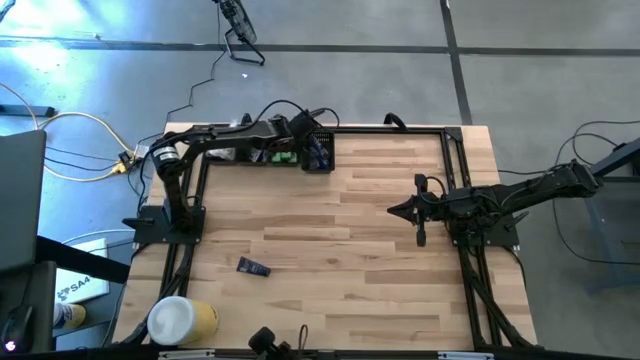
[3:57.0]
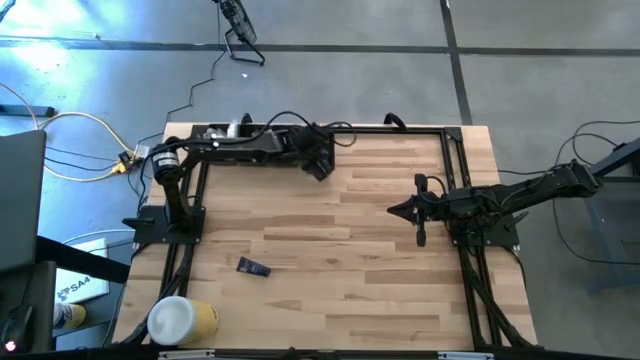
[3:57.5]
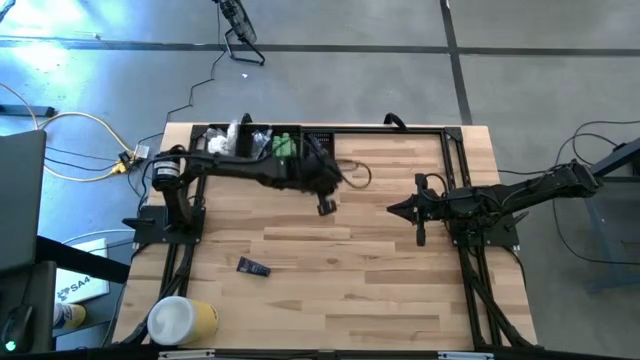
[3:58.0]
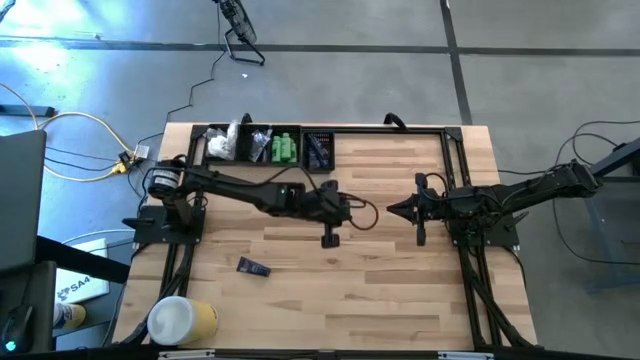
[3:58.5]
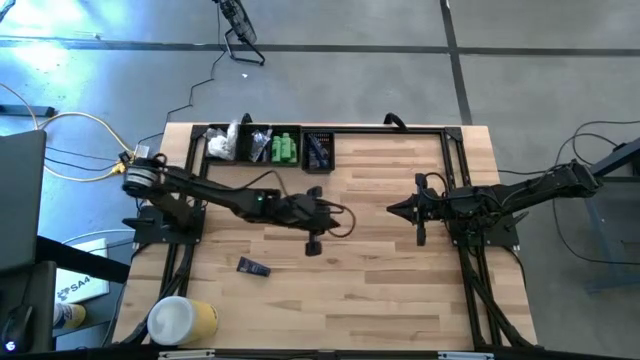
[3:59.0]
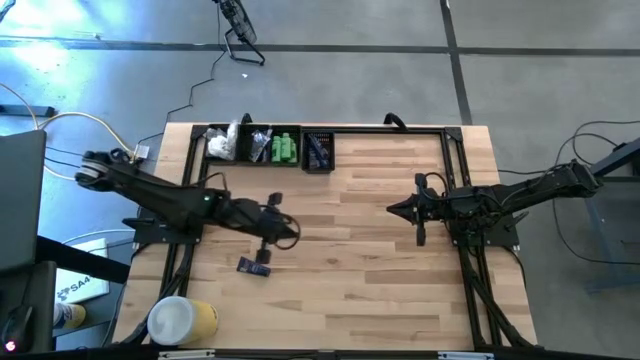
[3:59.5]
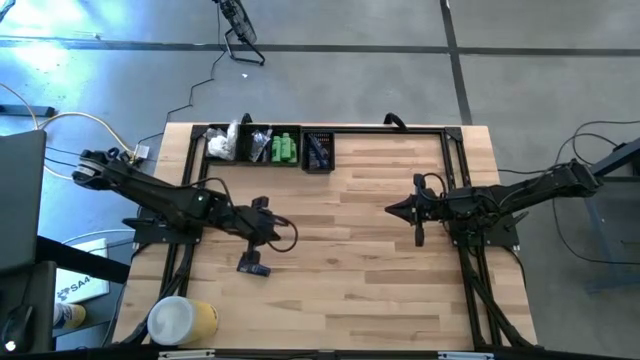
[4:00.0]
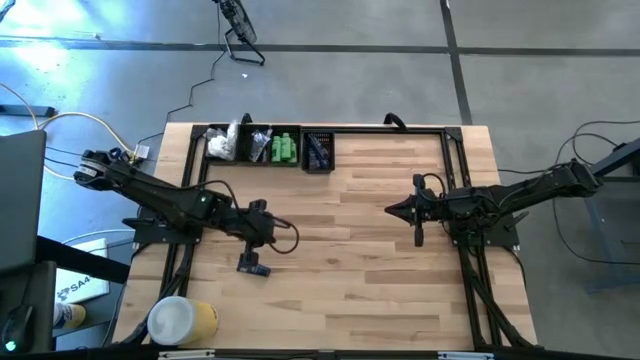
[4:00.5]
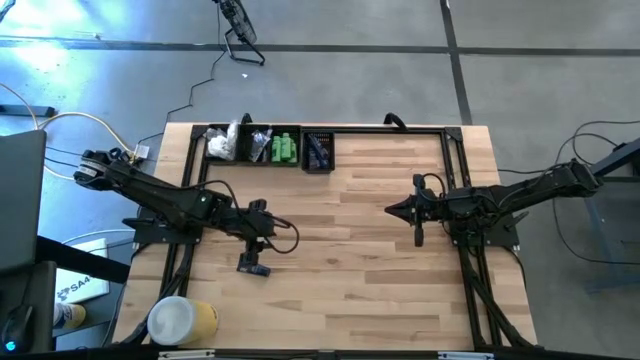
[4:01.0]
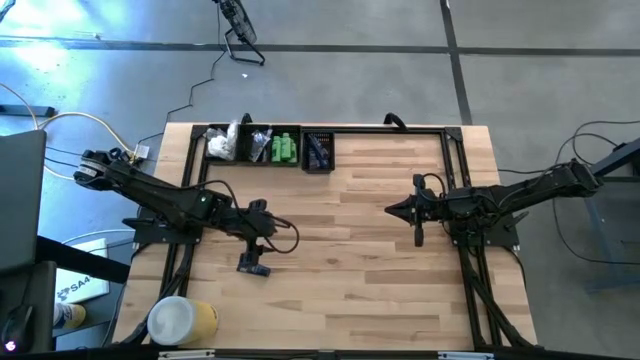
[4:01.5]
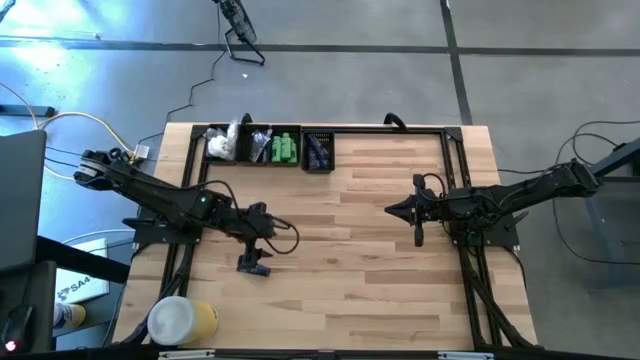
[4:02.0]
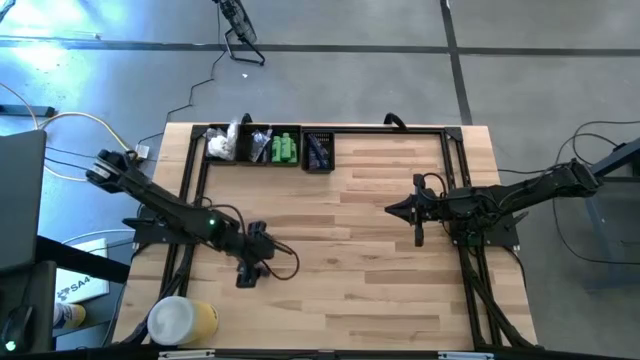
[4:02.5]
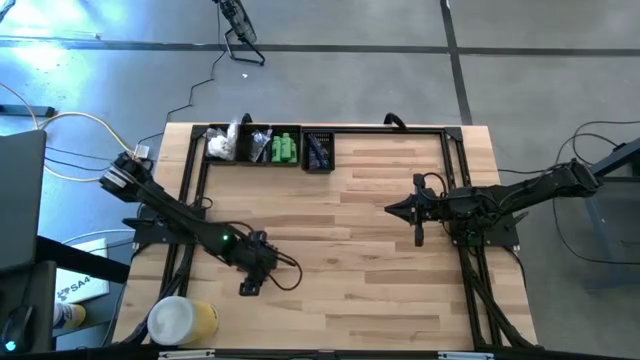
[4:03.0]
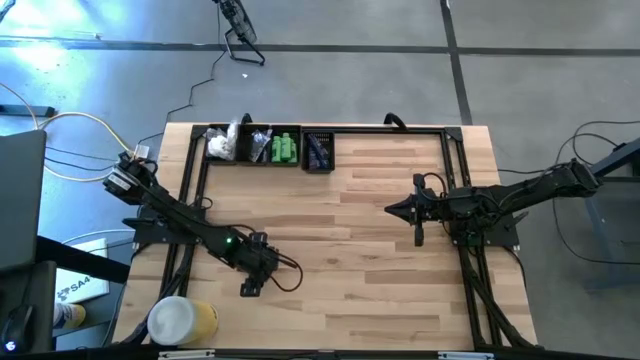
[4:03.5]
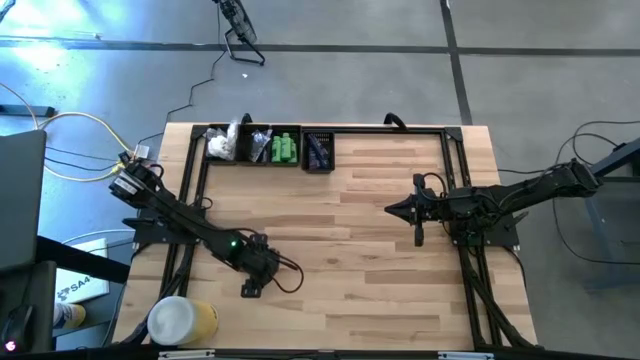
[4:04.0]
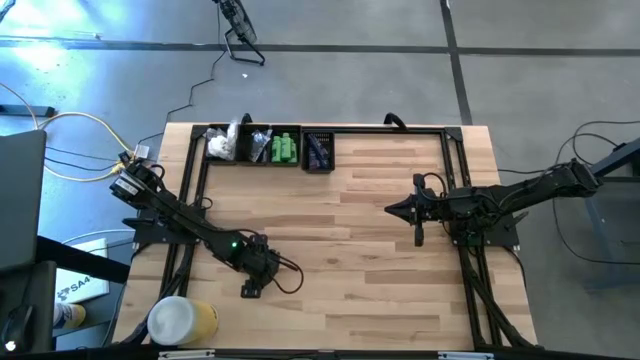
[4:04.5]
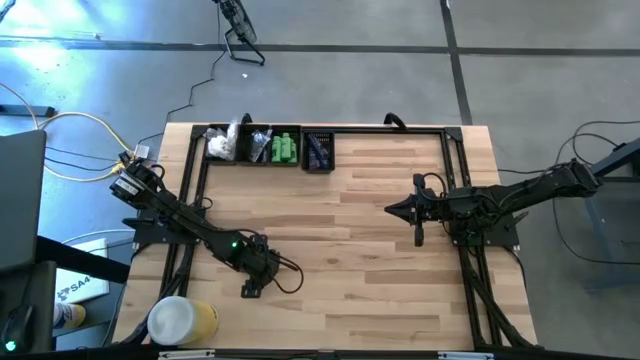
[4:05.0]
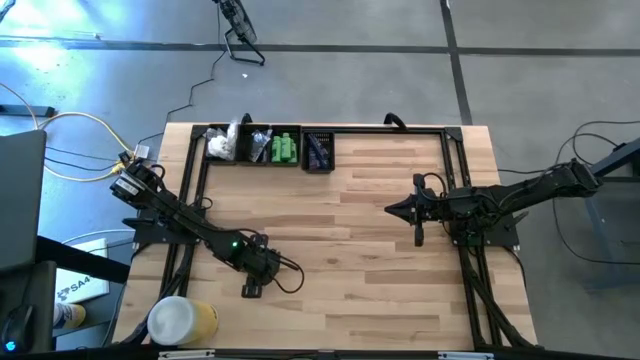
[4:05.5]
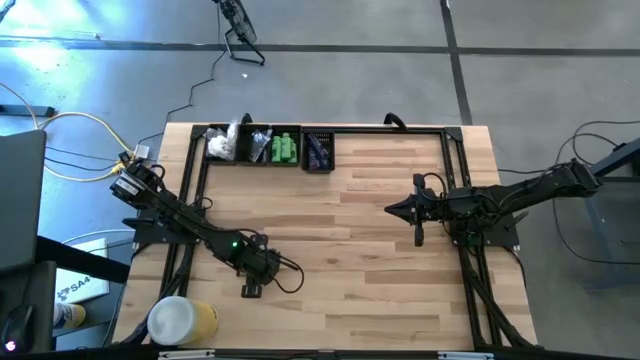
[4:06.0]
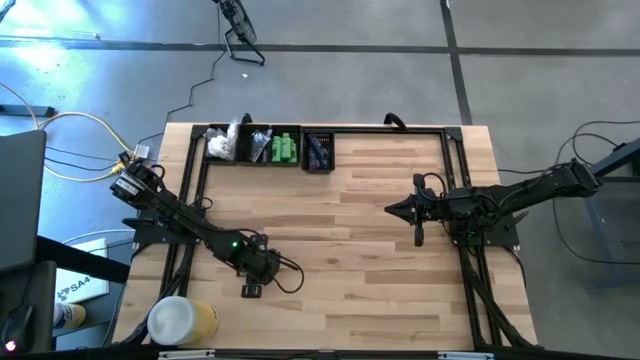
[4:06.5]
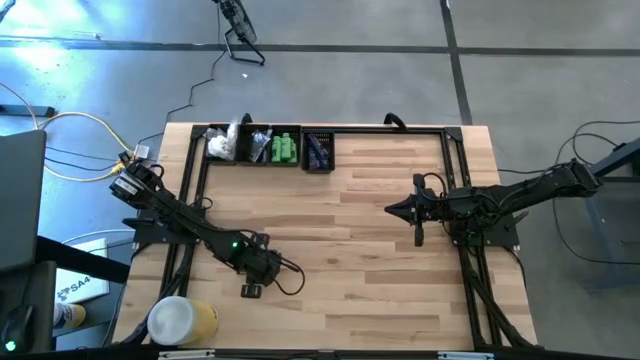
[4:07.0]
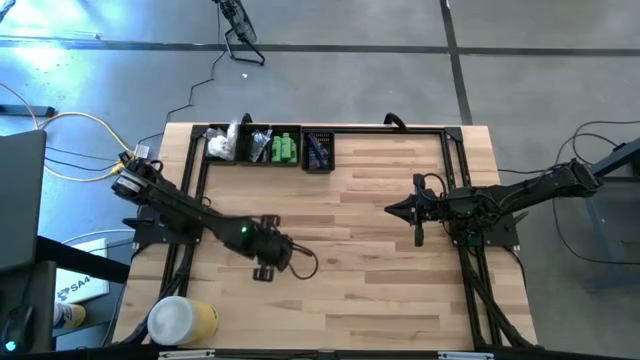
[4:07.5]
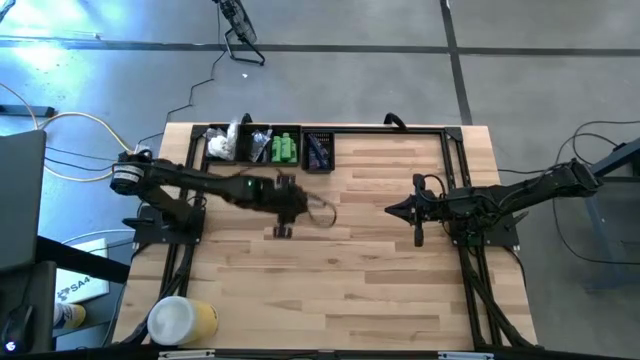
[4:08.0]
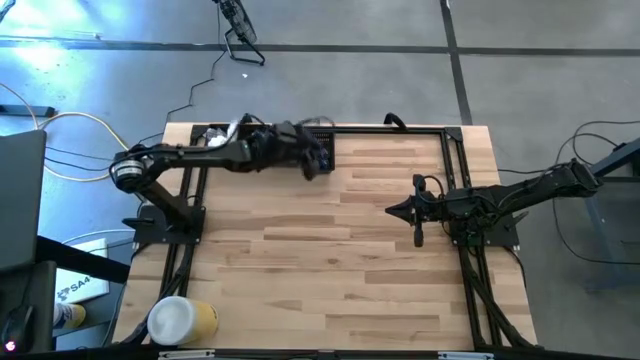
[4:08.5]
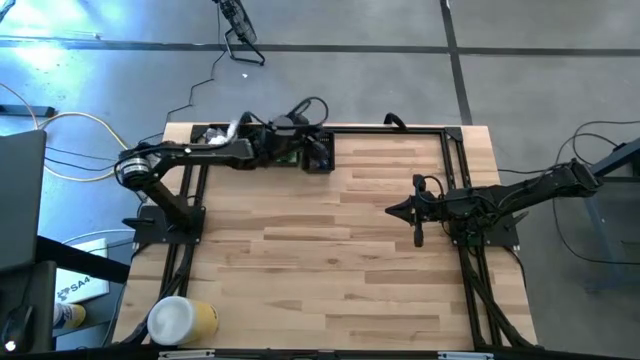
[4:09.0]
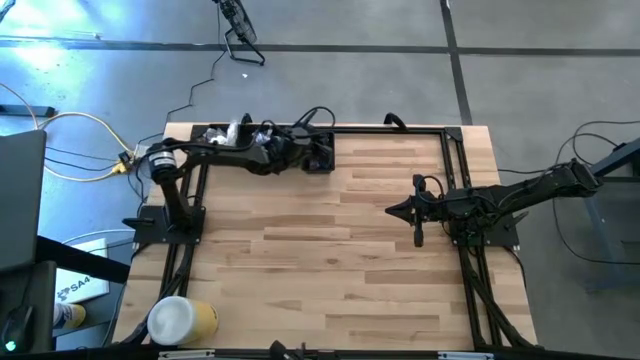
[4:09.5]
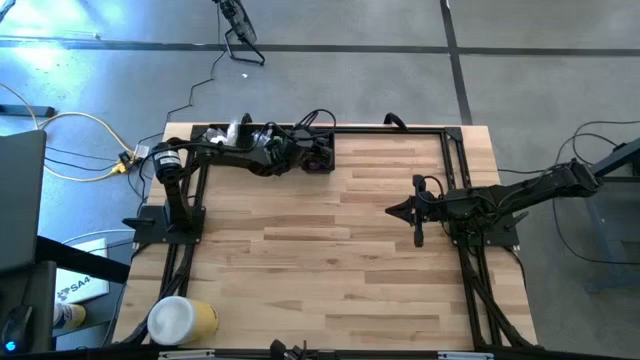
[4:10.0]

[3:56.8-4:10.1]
Task: Pick & Place Travel size toiletries
Put the shave cream into the right black bin

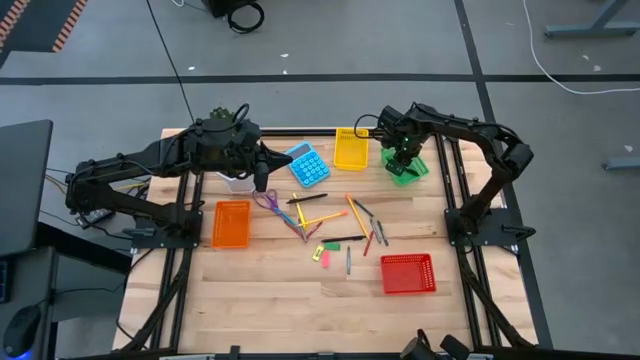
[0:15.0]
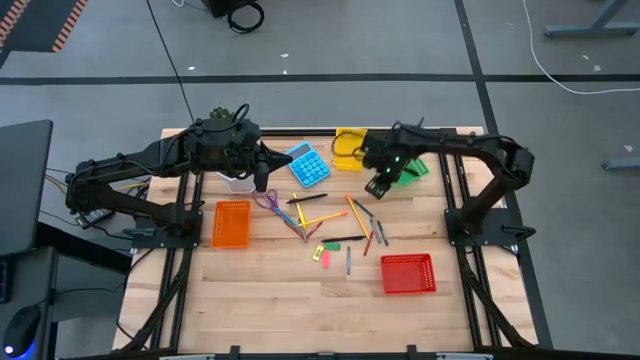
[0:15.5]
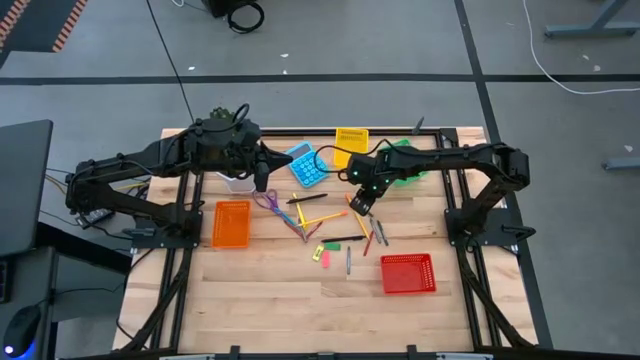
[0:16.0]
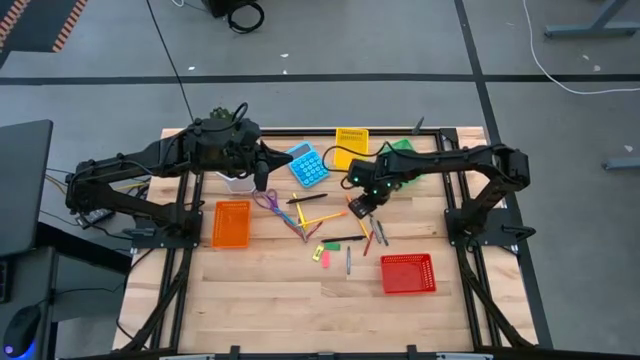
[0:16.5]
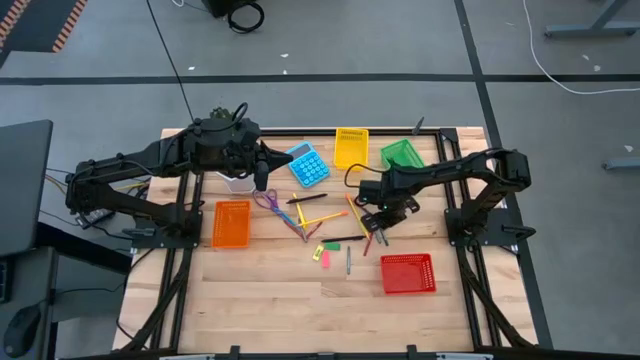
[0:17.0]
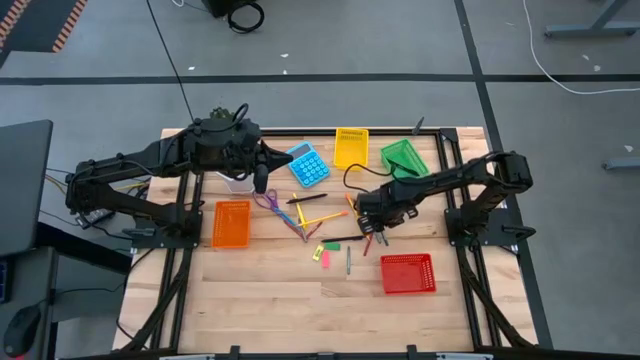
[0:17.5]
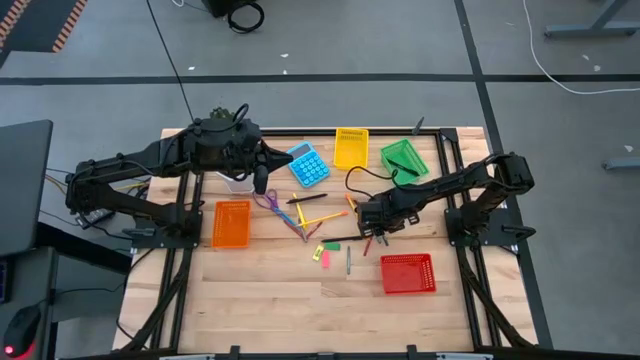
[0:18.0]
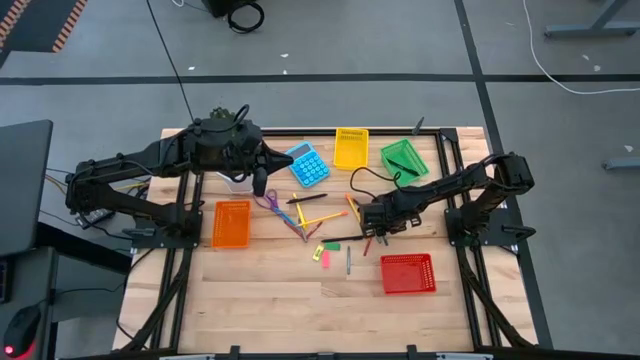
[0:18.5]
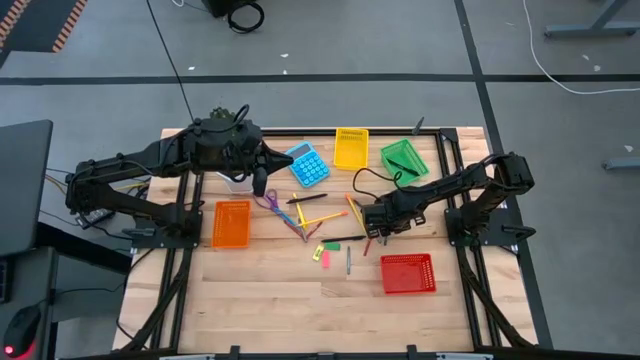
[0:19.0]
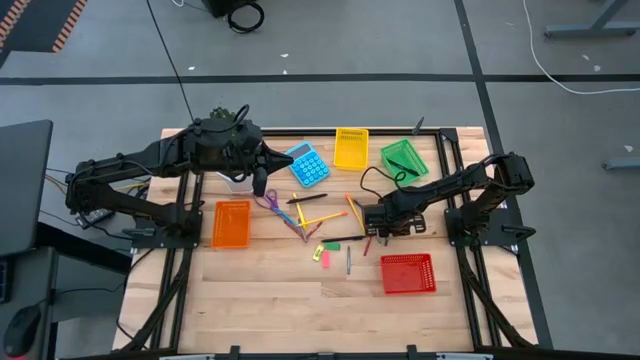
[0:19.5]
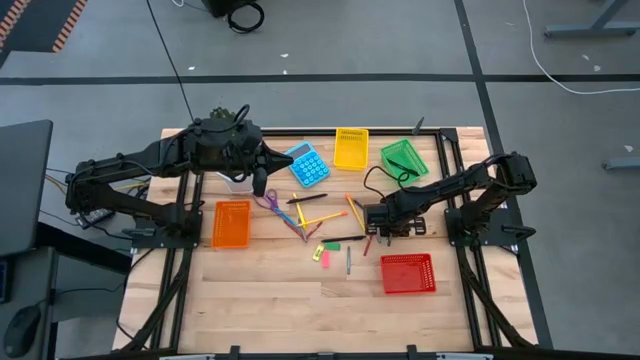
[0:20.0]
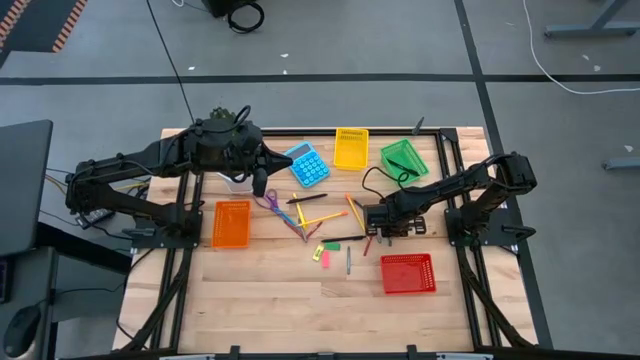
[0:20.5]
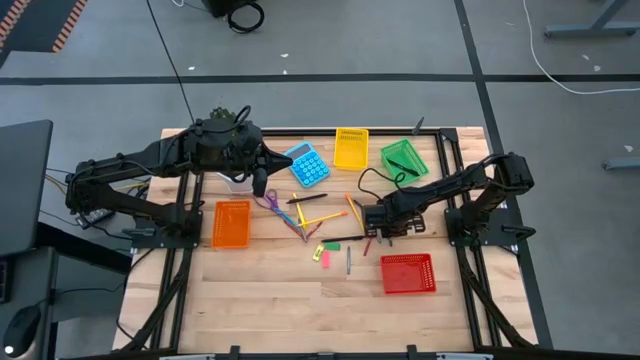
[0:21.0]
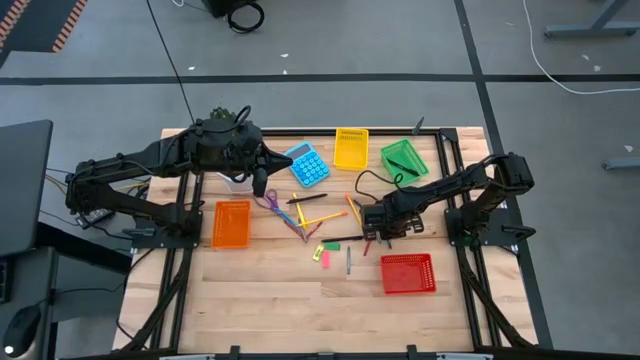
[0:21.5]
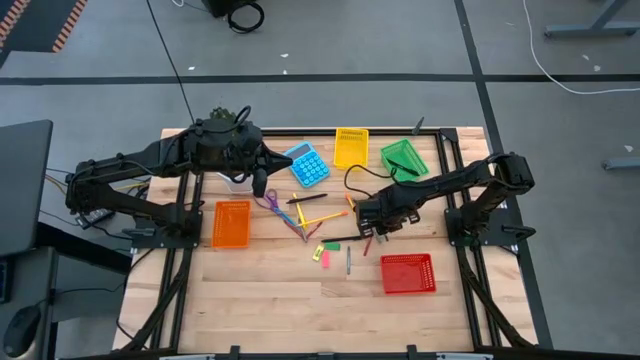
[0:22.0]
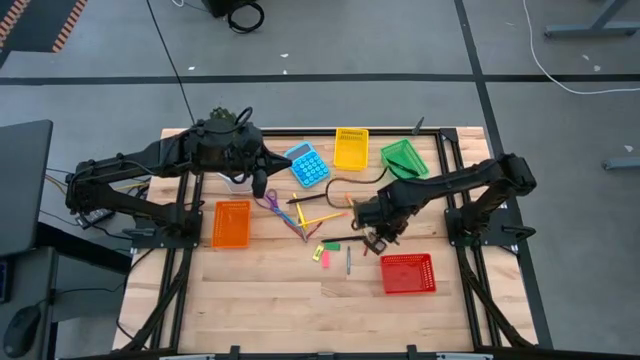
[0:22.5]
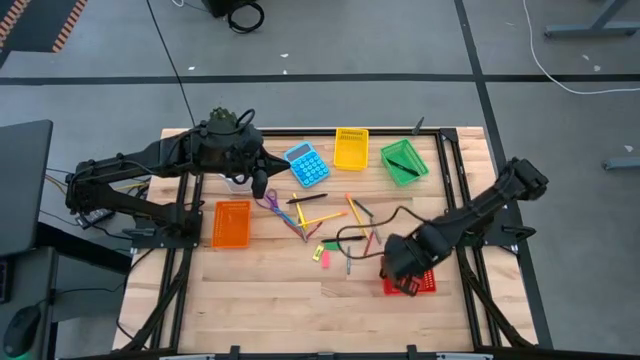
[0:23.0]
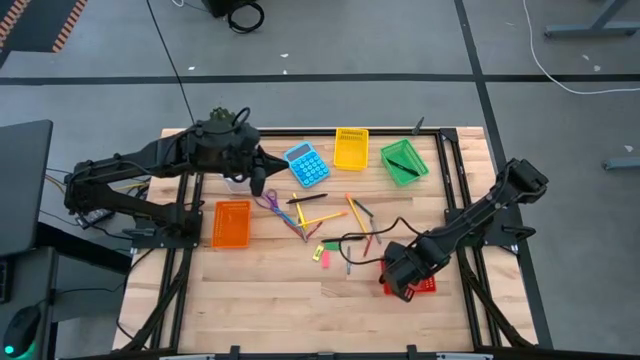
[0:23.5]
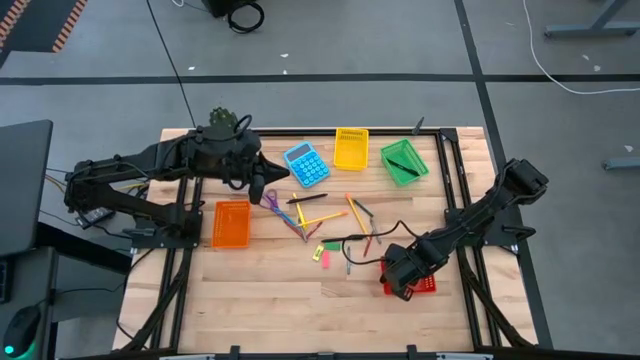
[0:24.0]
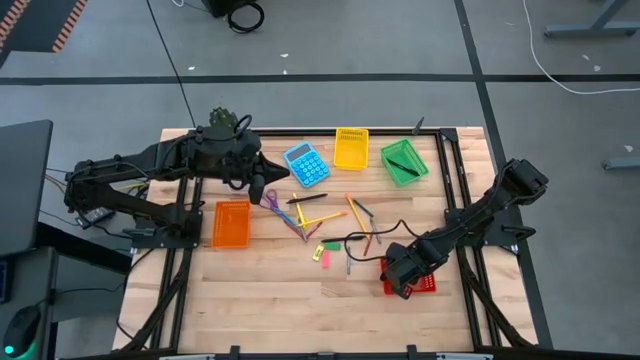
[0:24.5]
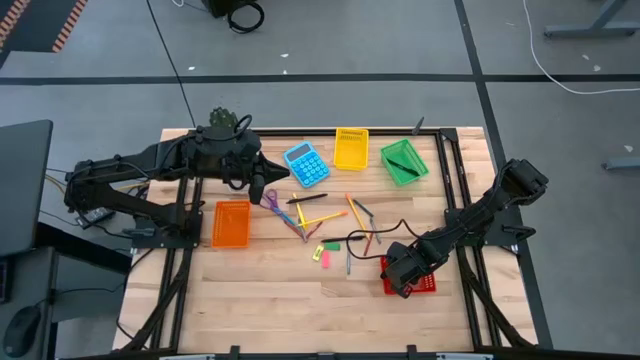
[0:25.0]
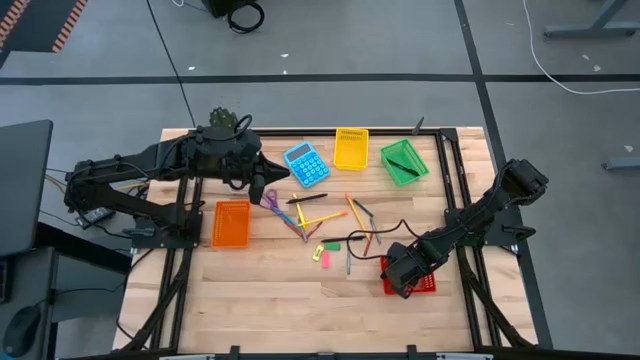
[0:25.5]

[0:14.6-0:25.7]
Task: Sort crayons/erasers/pens/pencils in bins
Put the bottom green crayon into the red bin
